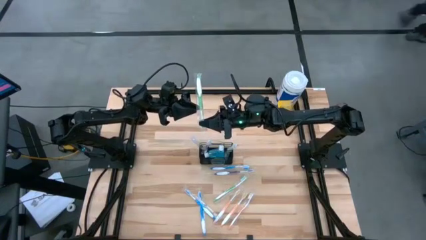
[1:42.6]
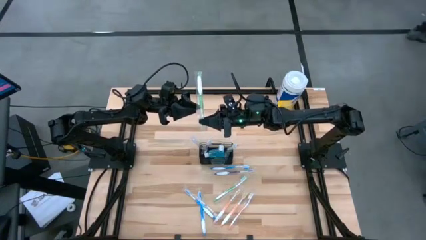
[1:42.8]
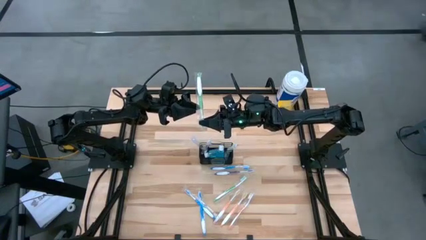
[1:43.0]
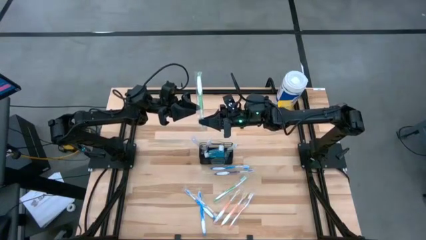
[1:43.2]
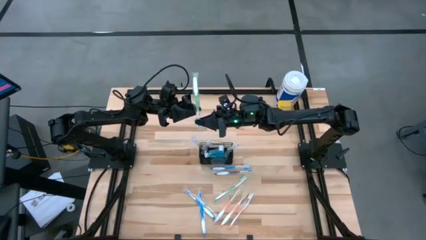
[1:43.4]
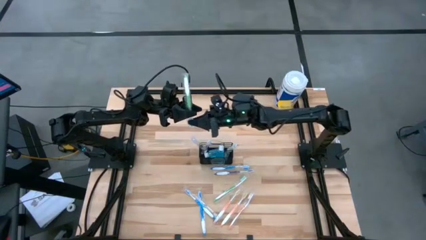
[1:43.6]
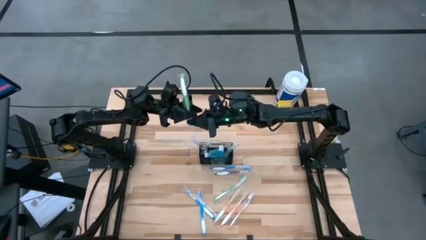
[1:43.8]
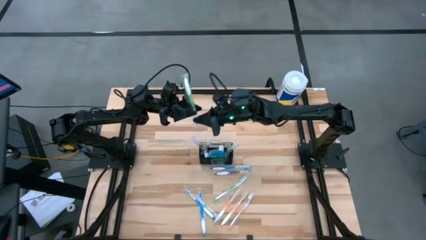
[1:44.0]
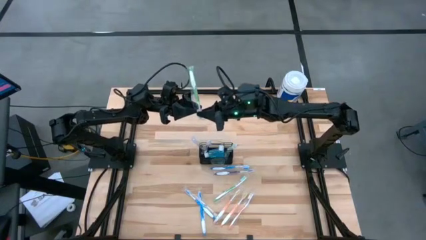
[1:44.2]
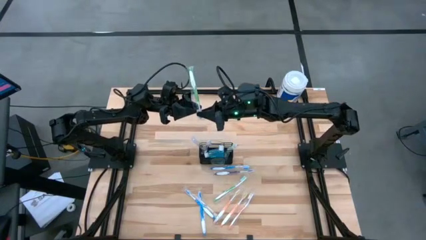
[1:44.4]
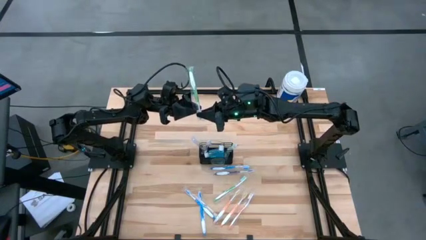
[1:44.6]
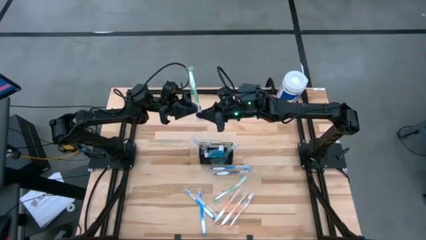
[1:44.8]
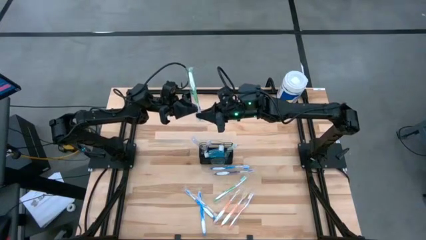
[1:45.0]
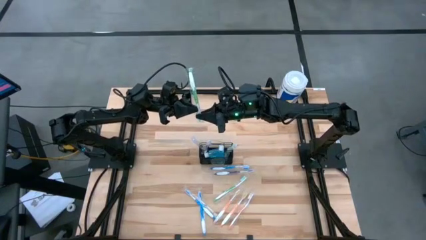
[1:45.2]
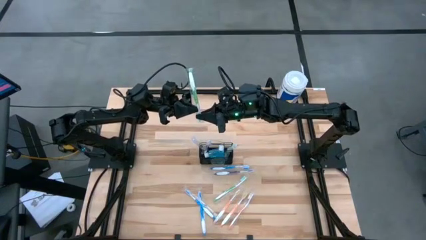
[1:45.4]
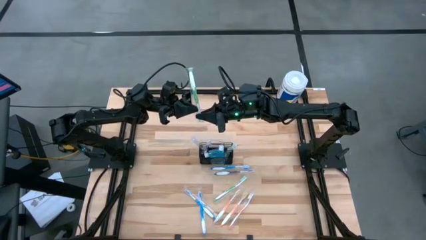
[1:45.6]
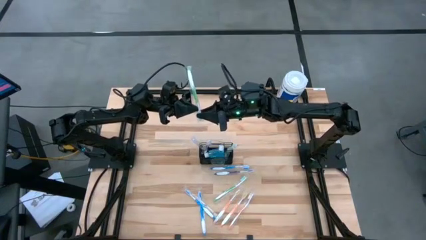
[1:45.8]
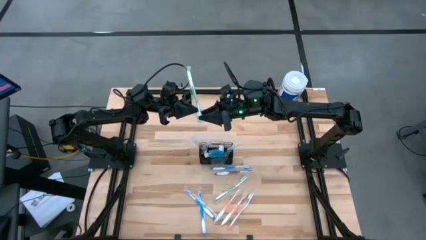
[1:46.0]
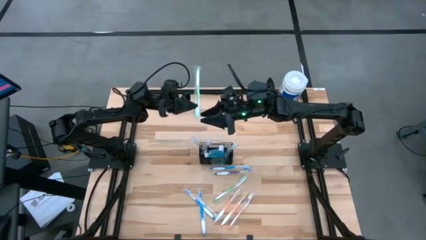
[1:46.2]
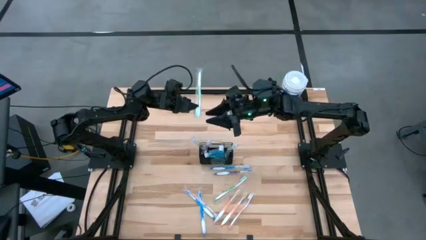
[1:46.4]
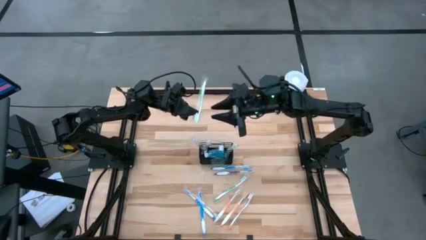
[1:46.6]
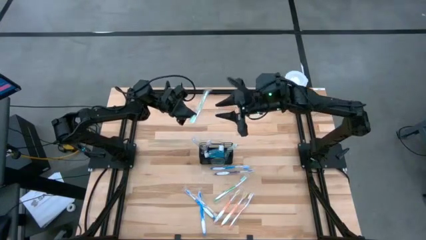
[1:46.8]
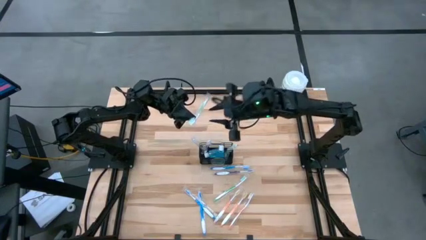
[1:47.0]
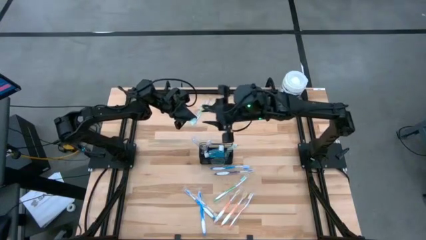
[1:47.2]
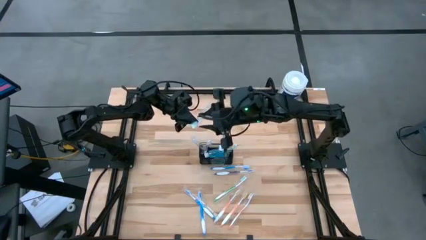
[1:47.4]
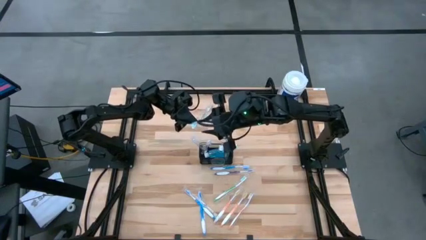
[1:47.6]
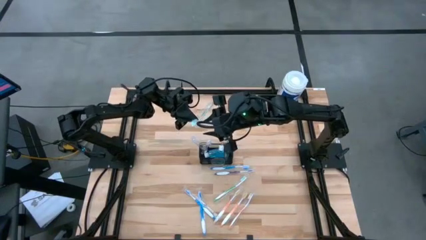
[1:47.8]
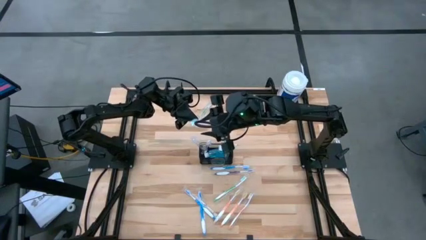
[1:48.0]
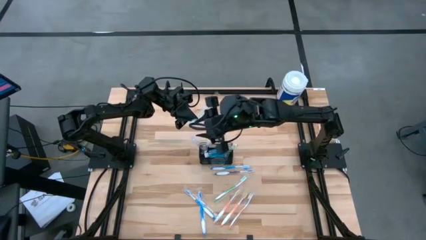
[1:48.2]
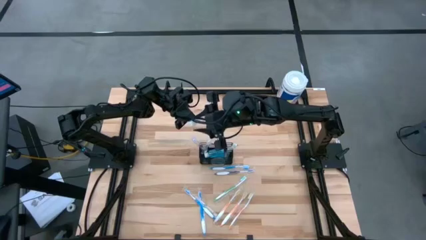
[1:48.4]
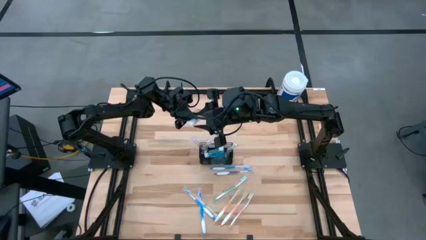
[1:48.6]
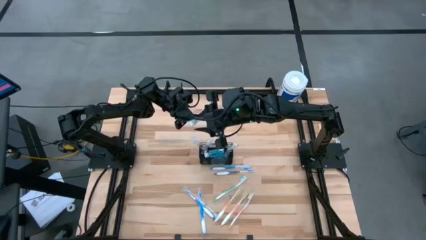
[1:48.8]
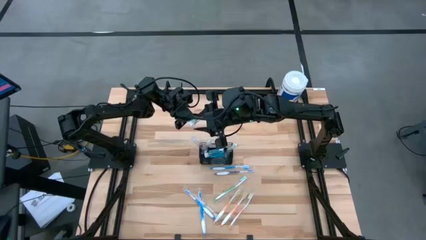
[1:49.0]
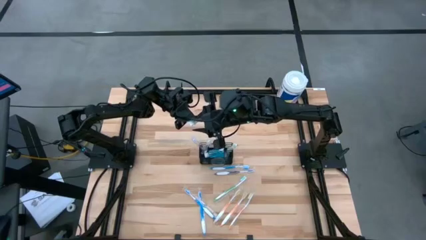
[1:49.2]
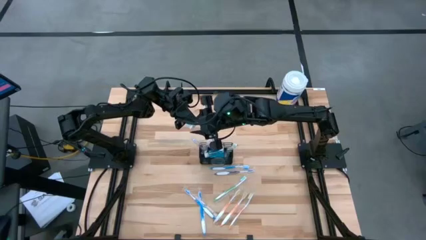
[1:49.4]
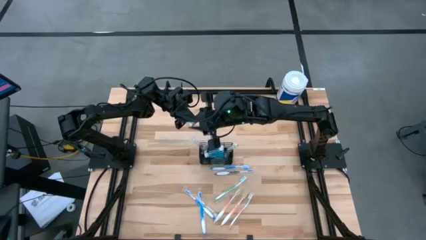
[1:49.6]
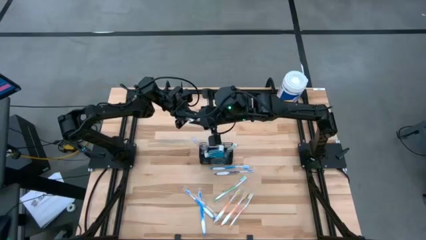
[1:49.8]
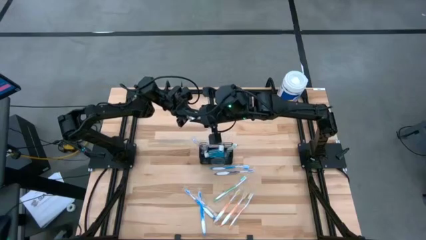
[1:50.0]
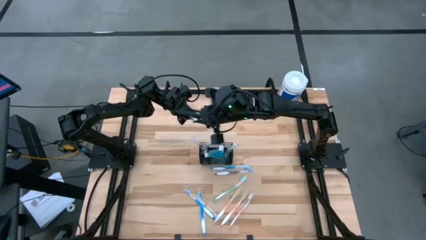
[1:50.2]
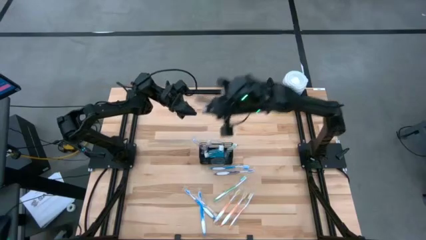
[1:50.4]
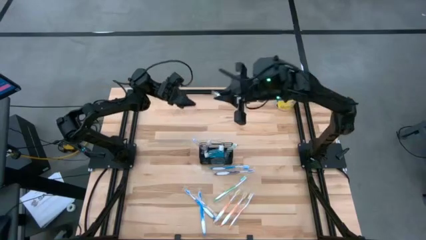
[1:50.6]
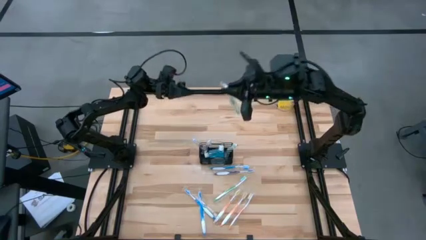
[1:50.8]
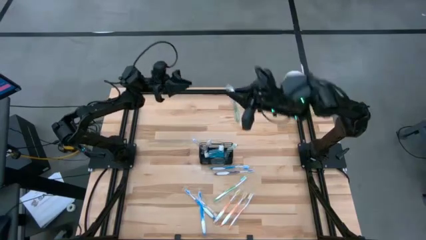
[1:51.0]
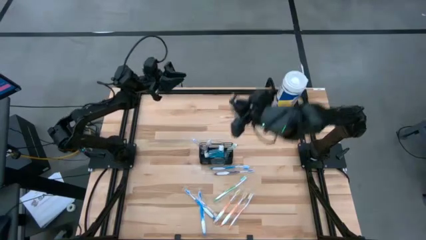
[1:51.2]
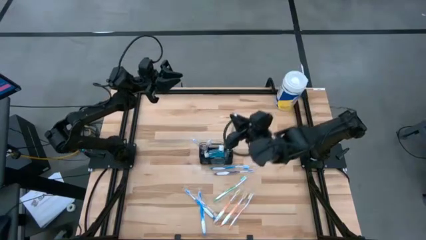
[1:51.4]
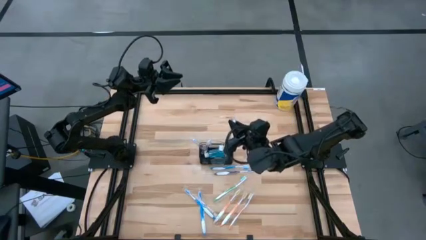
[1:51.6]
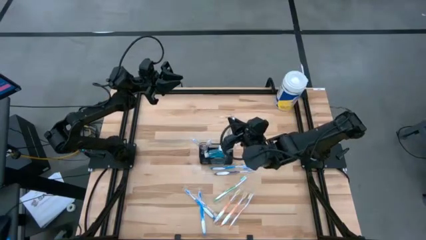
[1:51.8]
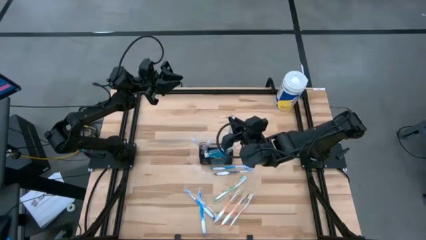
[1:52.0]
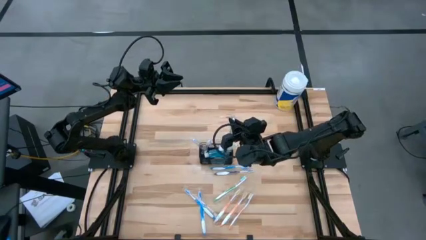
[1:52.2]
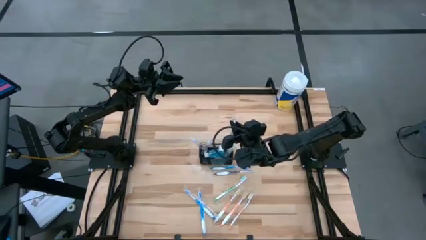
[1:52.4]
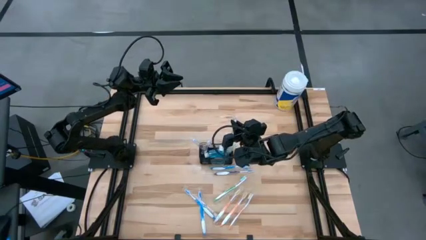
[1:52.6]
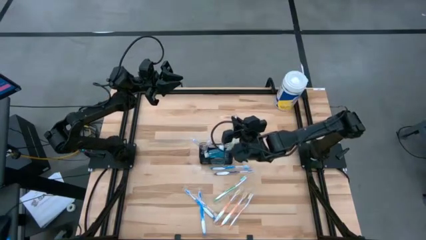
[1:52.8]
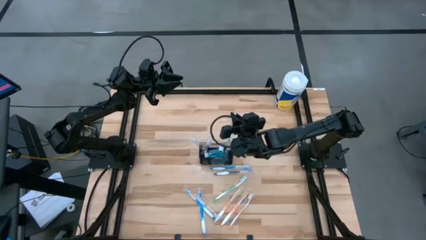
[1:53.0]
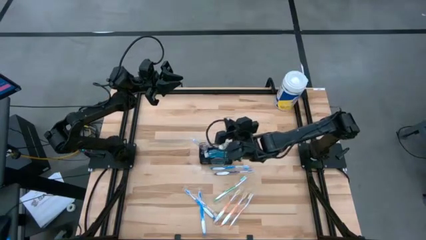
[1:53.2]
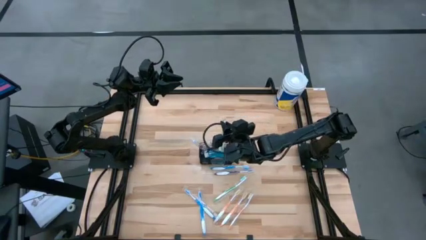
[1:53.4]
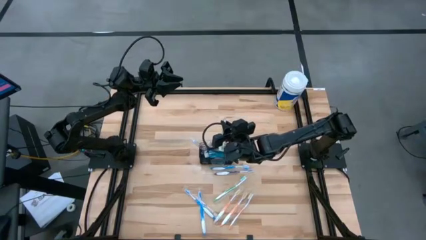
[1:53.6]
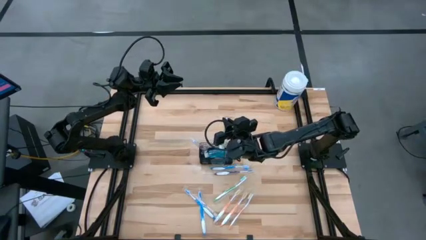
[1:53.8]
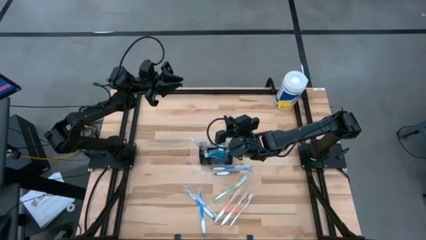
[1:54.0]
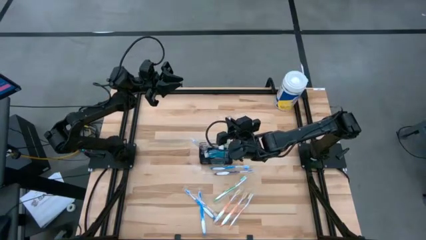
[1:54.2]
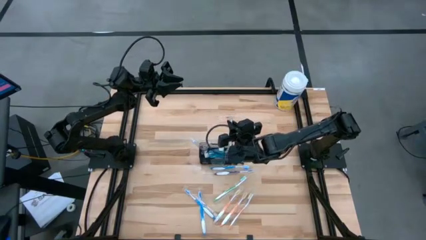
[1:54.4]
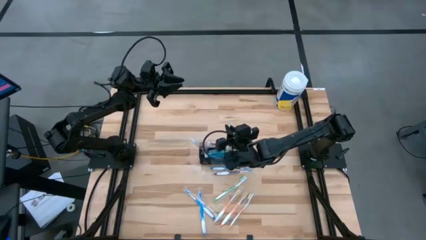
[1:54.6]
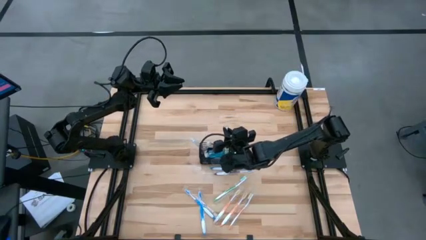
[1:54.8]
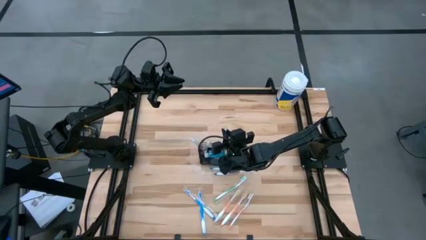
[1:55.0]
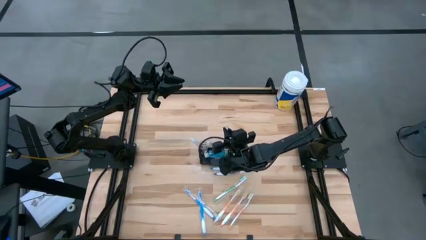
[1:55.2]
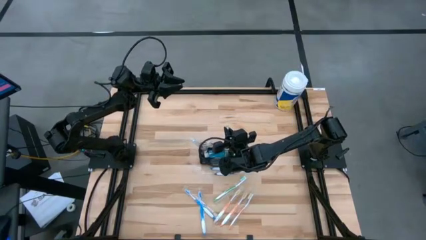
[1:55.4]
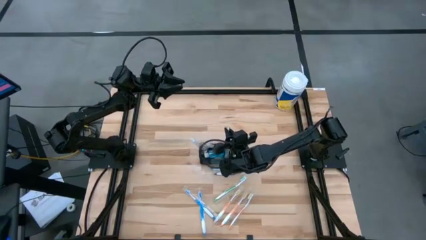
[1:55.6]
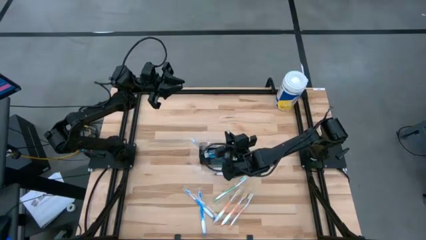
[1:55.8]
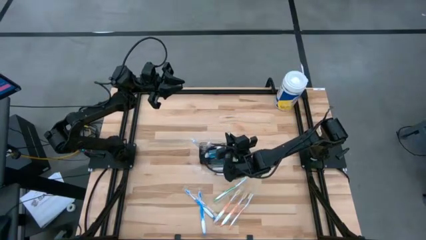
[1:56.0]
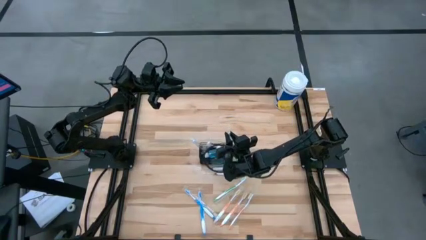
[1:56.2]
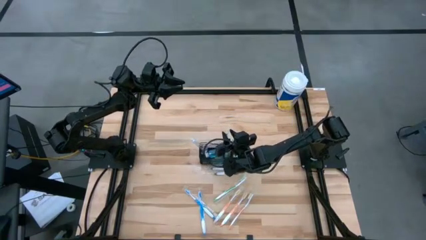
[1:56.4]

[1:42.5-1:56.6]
Task: Pick & Place toothbrushing station
Put the green toothbrush into the black wire organizer

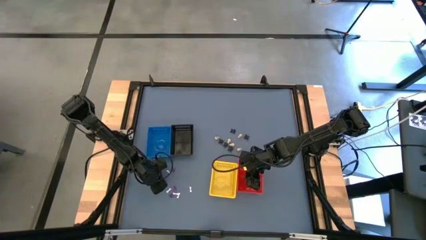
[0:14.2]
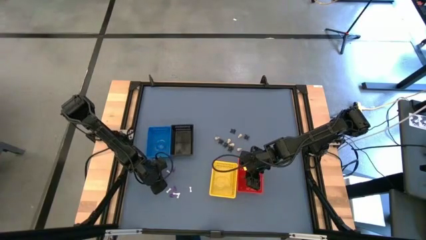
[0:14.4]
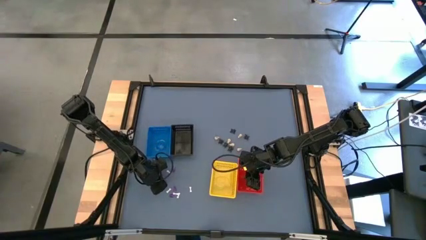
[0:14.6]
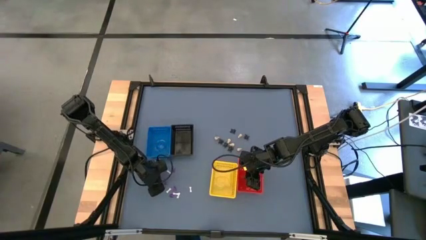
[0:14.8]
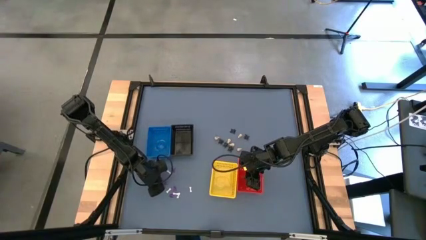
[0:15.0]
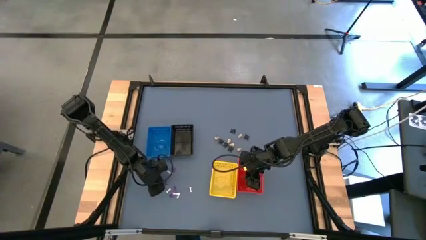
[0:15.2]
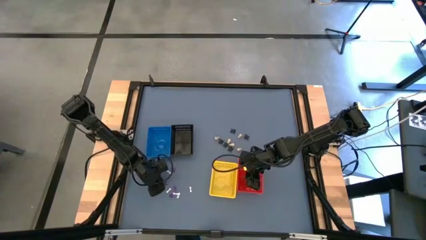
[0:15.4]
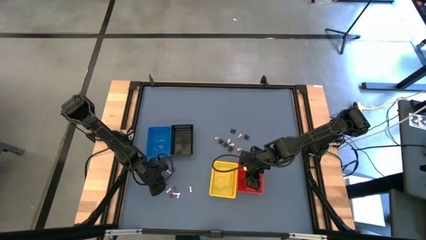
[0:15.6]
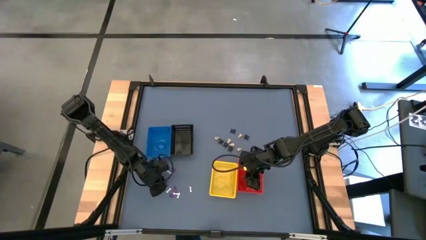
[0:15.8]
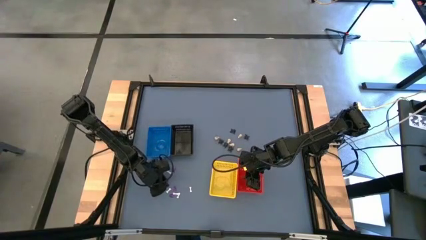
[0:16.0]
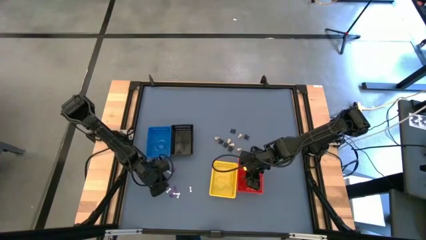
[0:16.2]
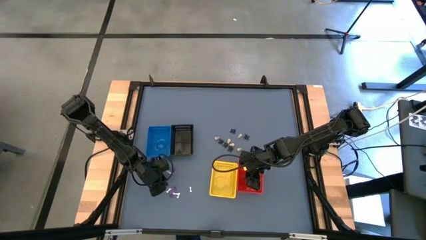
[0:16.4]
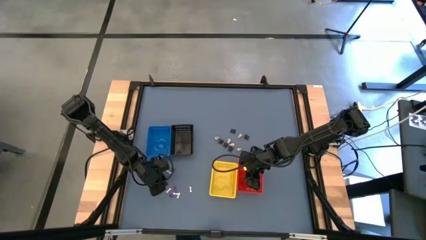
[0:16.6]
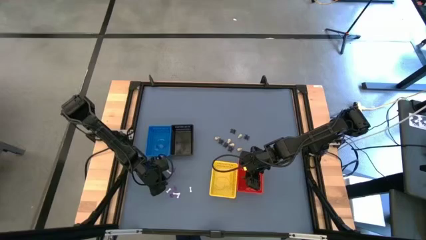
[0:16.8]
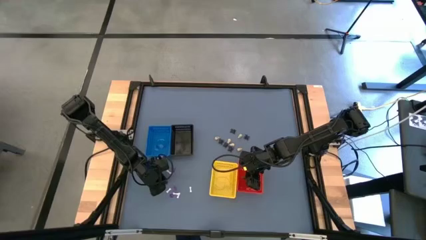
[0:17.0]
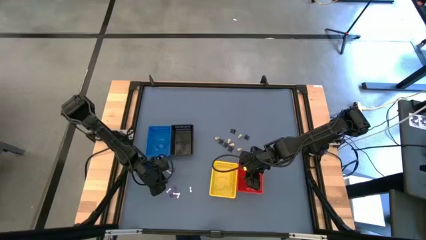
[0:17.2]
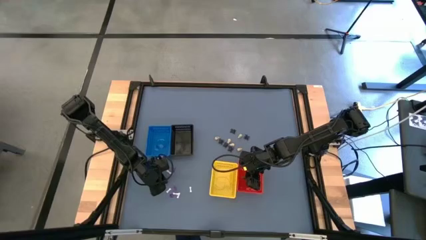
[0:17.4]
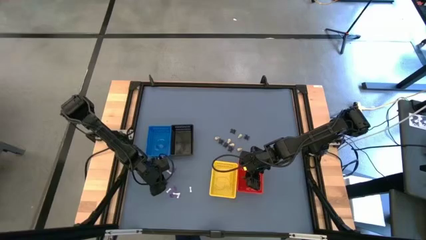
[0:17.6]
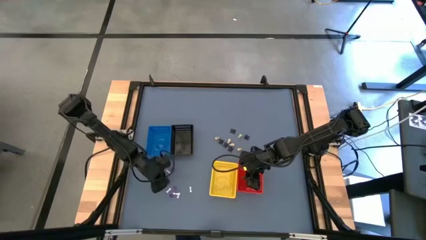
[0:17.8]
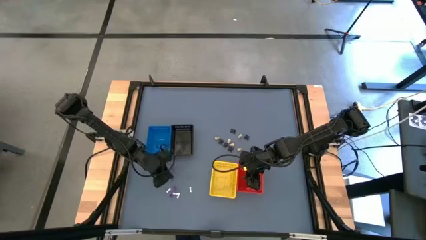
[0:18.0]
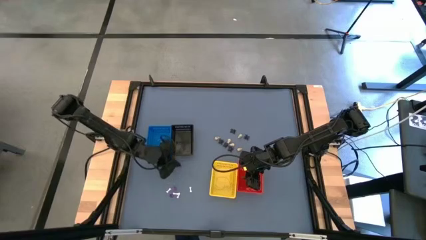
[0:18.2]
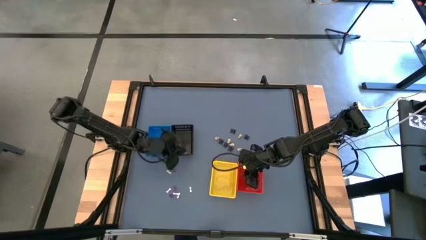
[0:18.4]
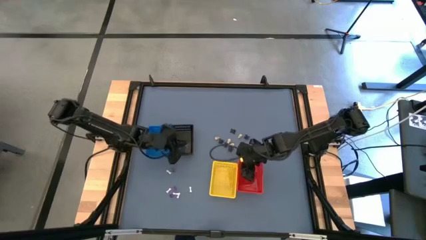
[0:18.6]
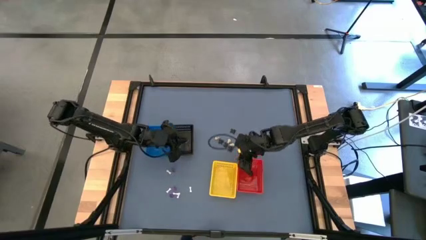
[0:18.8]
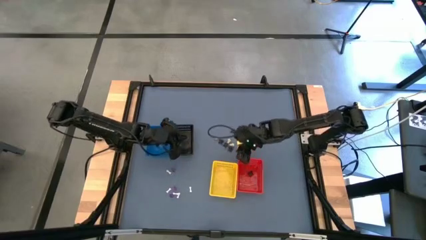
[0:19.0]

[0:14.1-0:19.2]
Task: Sort Halloween decoration
Put the witch hat toy into the black bin
